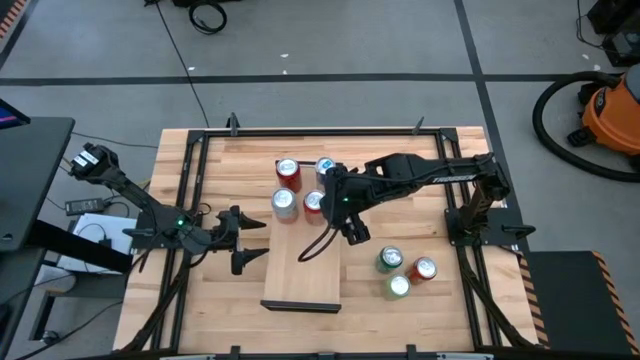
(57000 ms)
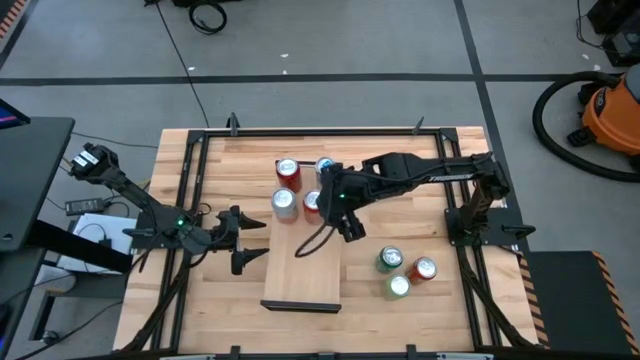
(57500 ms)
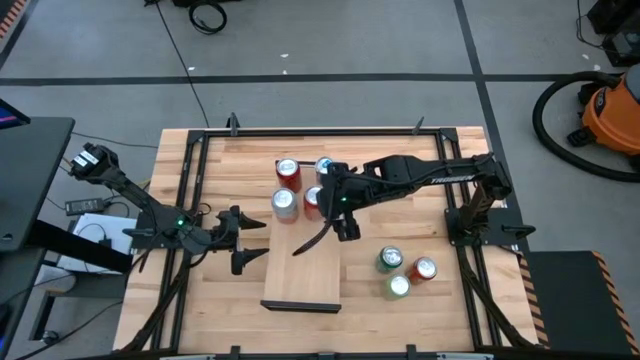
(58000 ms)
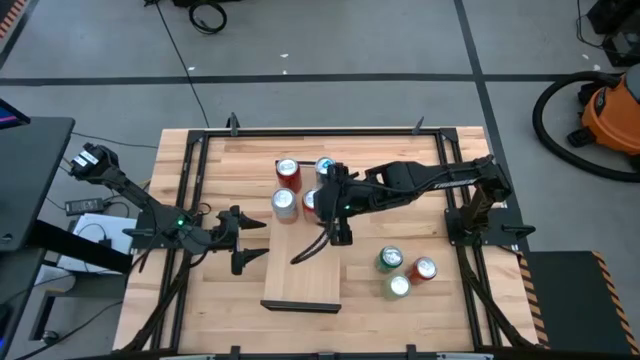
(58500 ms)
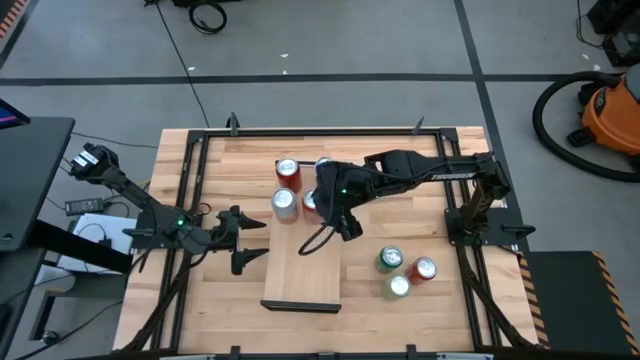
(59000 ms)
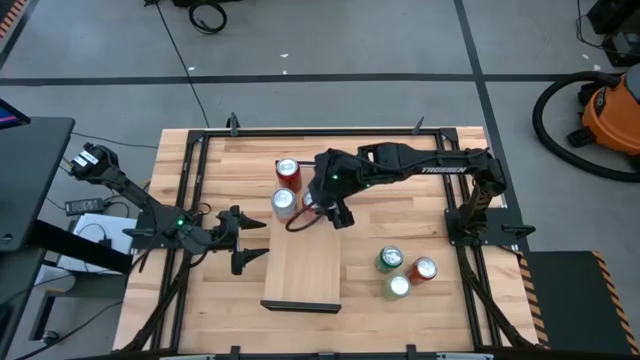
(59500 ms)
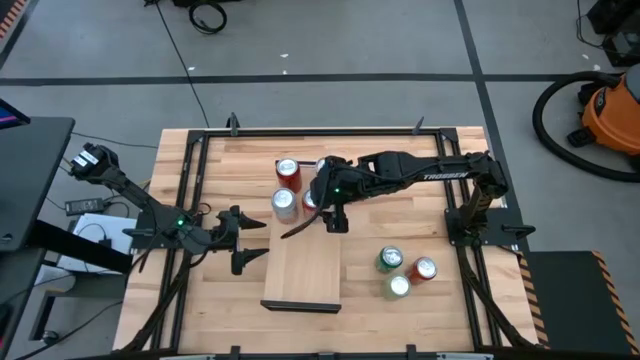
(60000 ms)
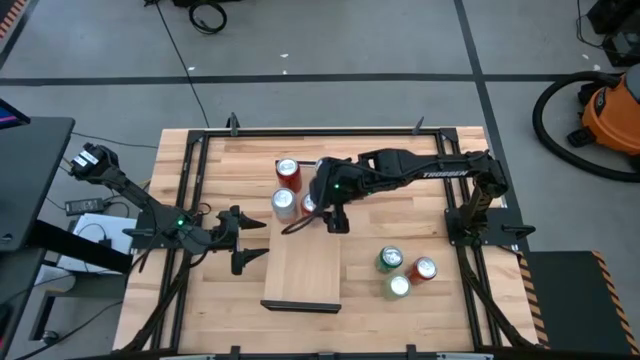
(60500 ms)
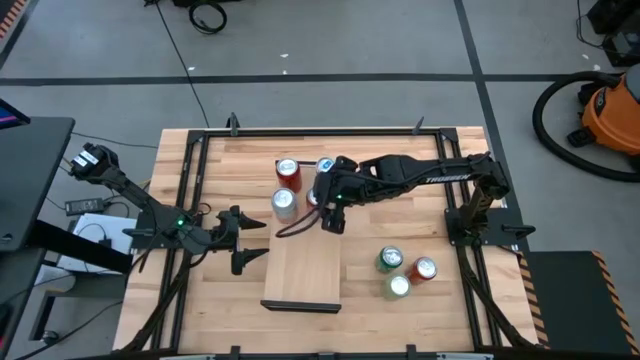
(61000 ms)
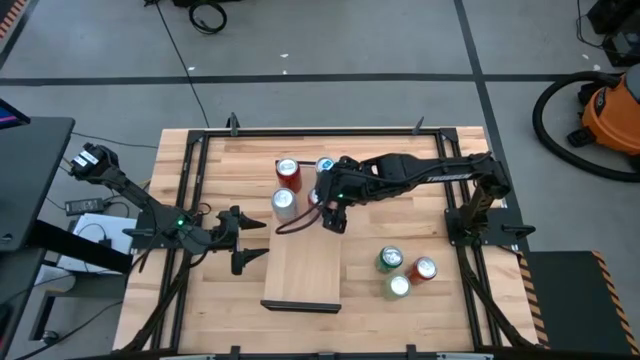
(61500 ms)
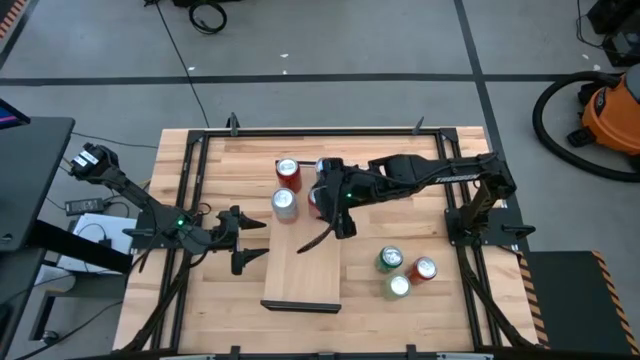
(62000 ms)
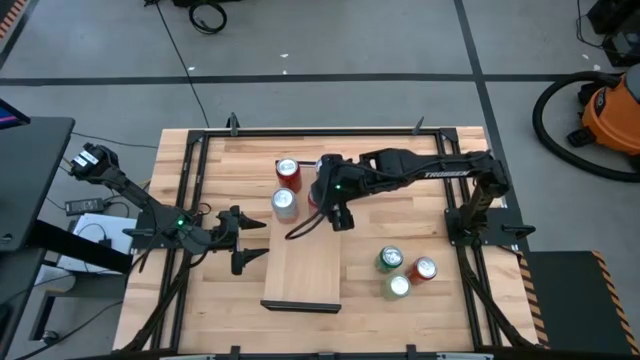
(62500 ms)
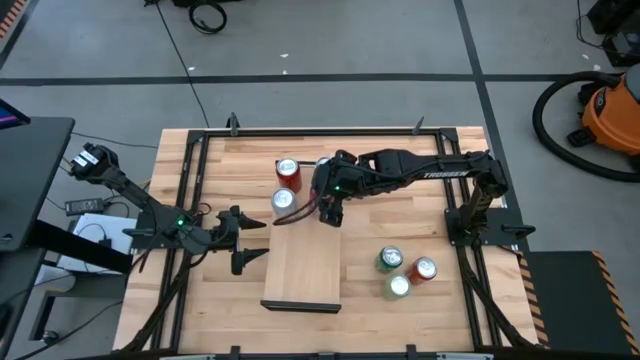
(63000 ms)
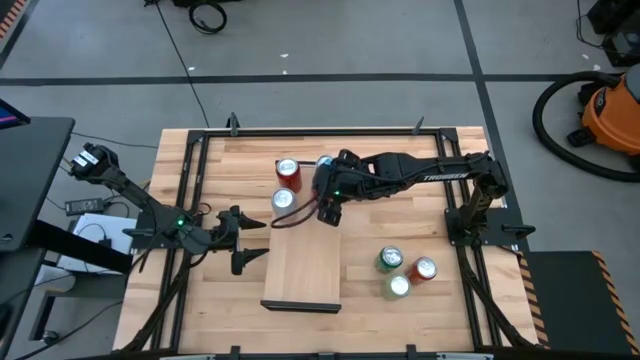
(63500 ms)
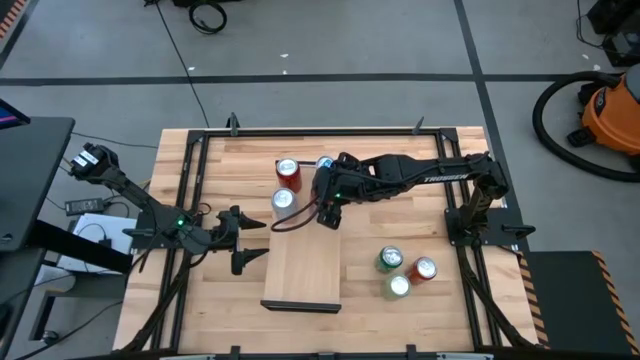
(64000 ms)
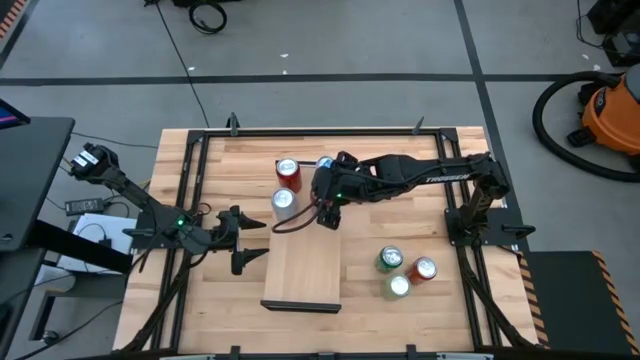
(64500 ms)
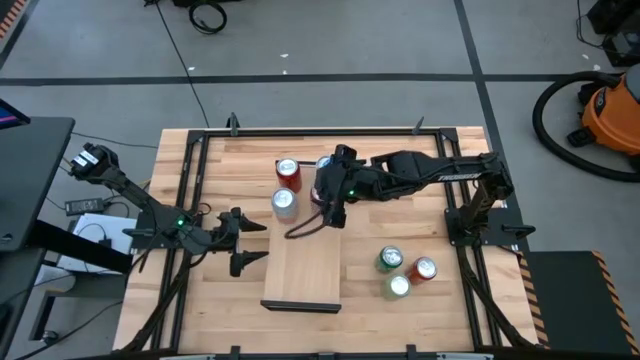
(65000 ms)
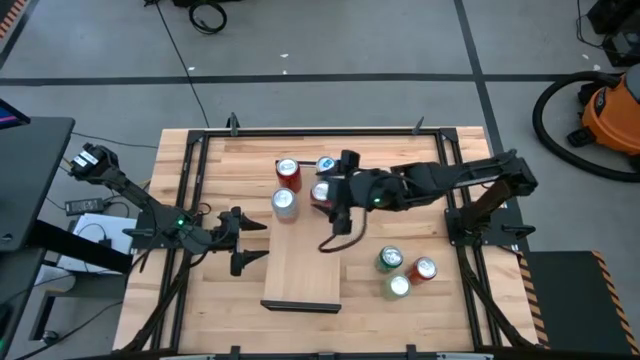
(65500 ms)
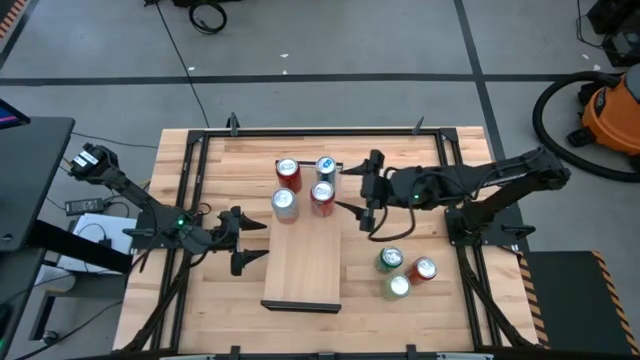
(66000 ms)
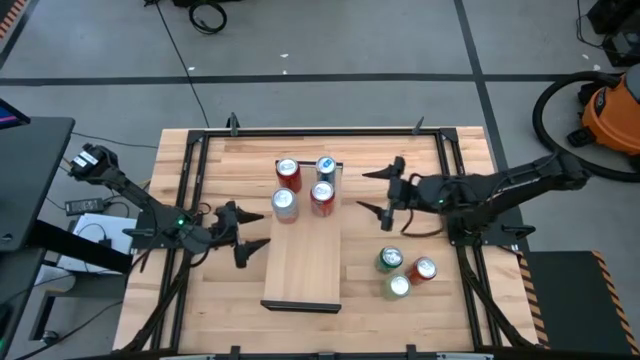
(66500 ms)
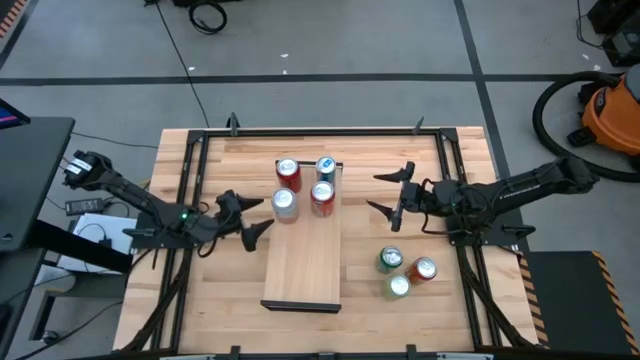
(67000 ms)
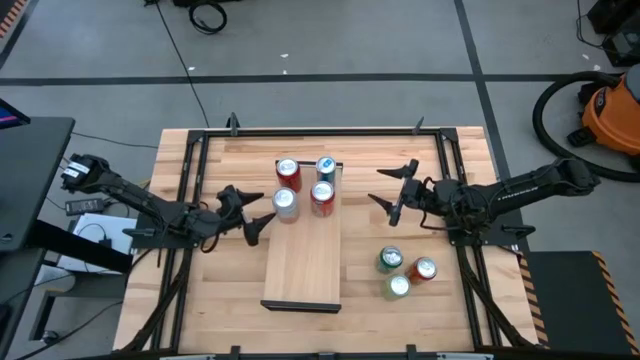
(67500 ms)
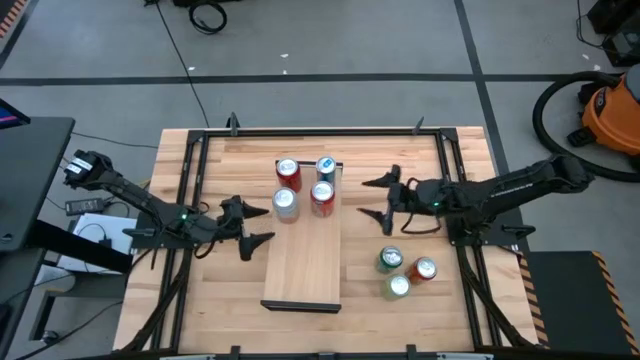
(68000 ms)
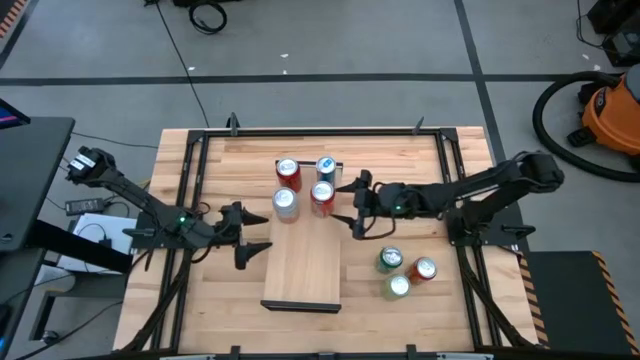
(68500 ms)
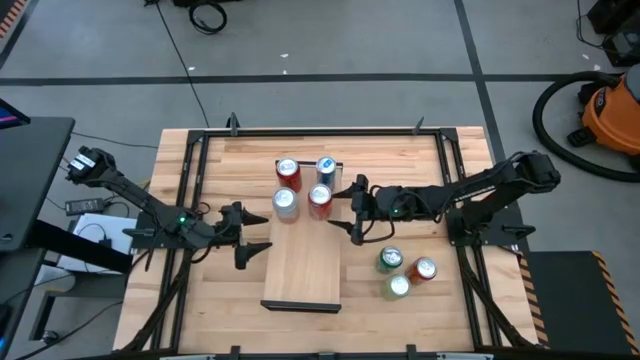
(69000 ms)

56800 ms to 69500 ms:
Task: Place canned beverage on shelf
Put the top orange soda can on the shelf

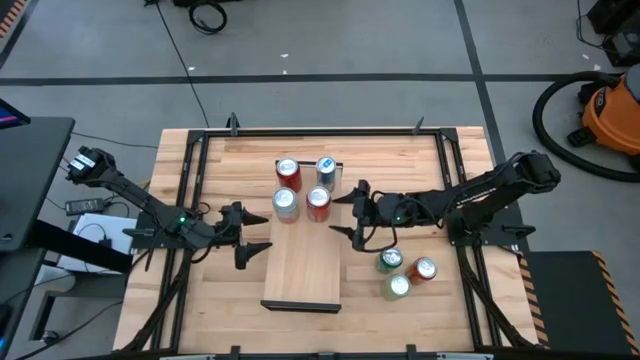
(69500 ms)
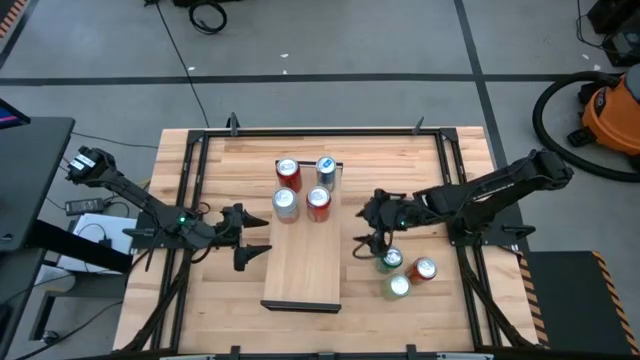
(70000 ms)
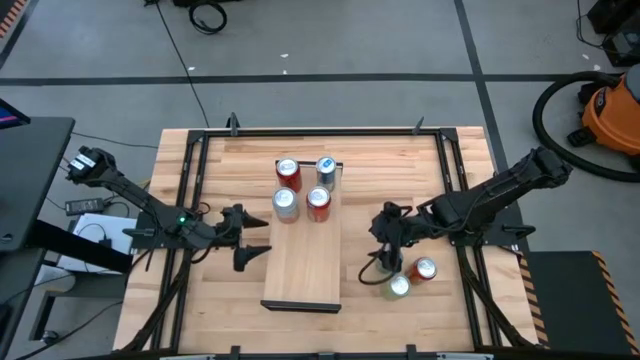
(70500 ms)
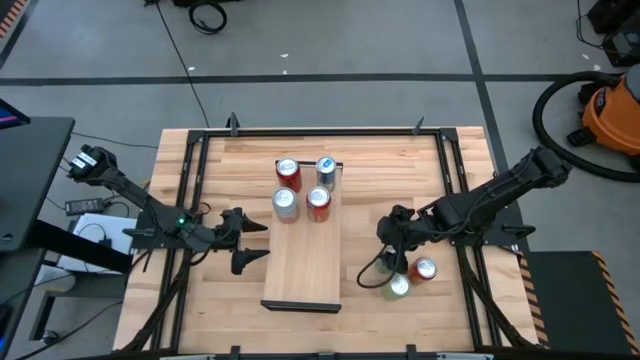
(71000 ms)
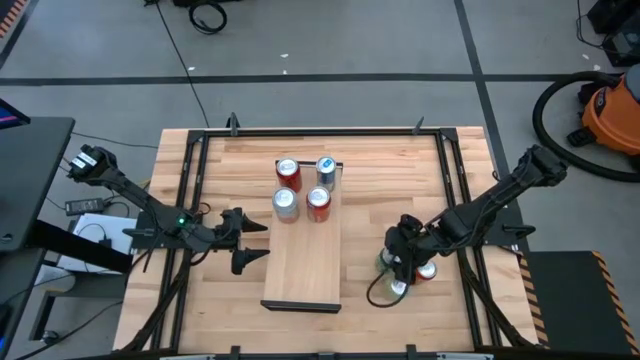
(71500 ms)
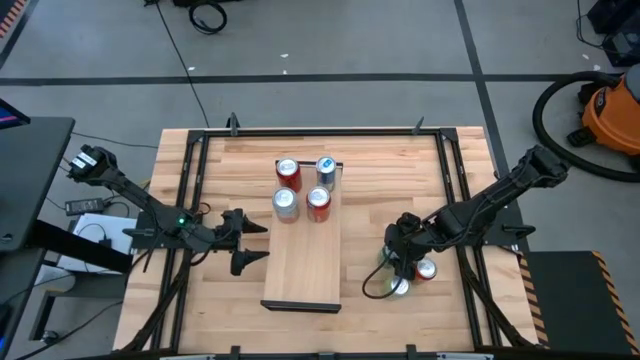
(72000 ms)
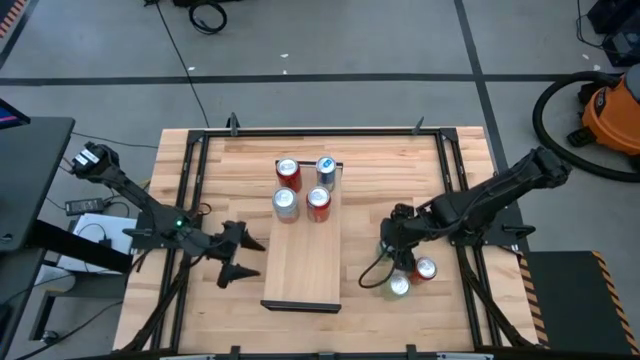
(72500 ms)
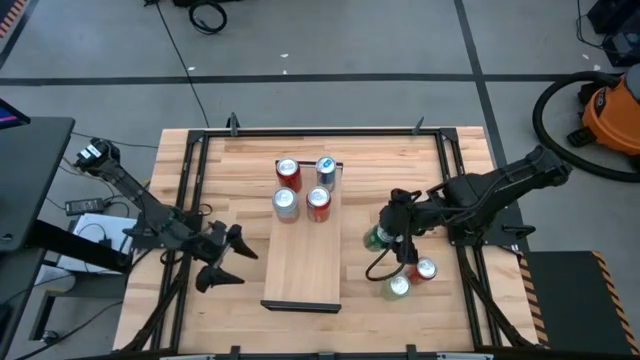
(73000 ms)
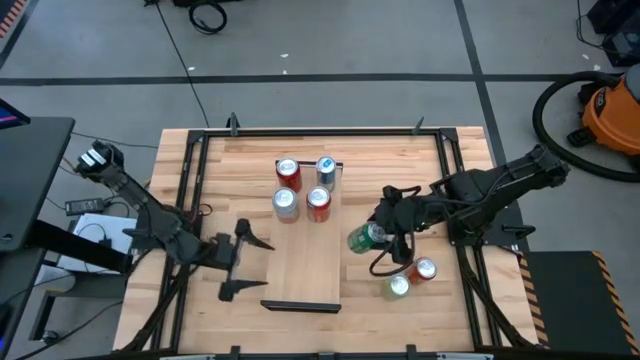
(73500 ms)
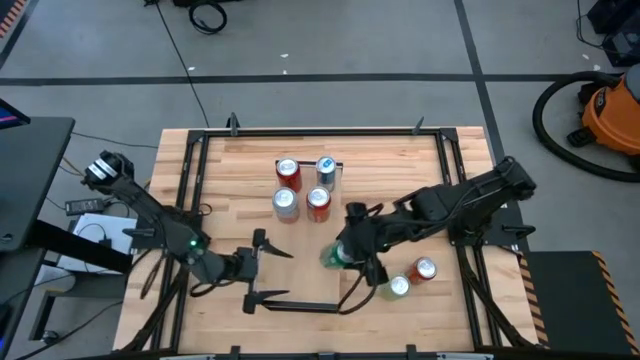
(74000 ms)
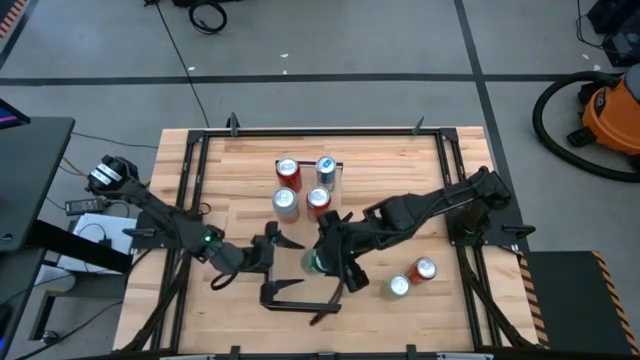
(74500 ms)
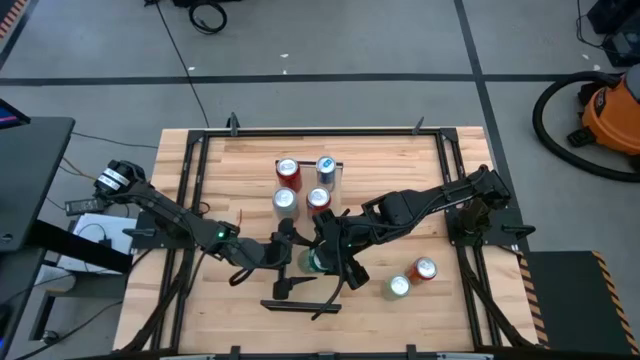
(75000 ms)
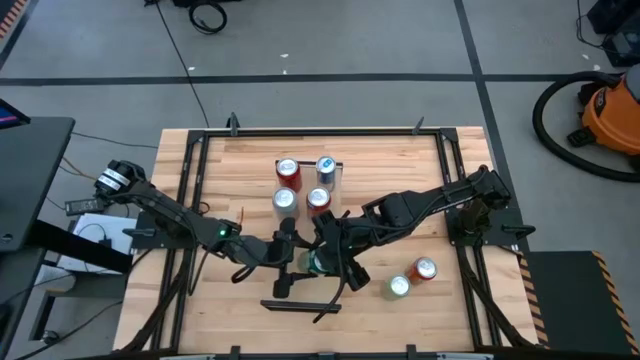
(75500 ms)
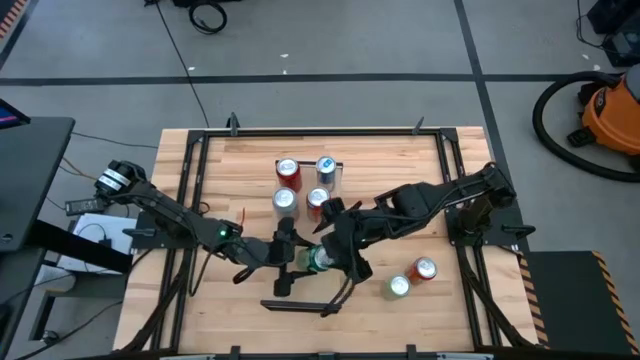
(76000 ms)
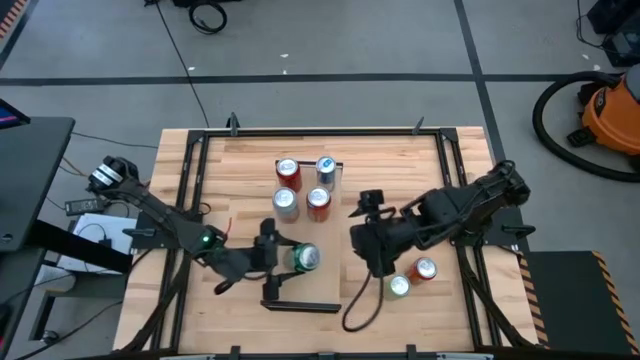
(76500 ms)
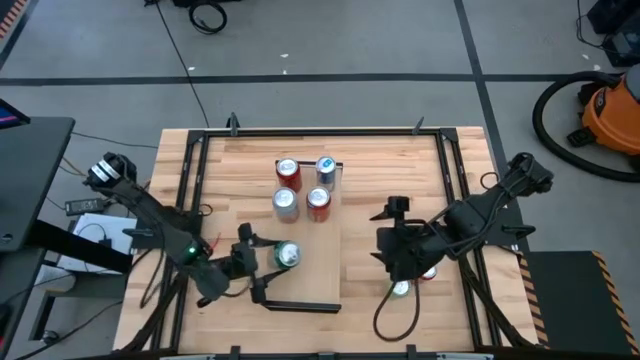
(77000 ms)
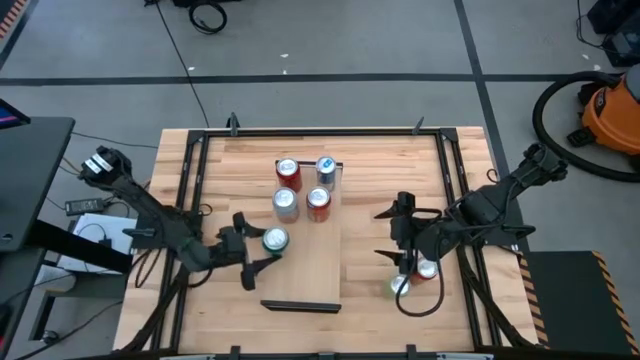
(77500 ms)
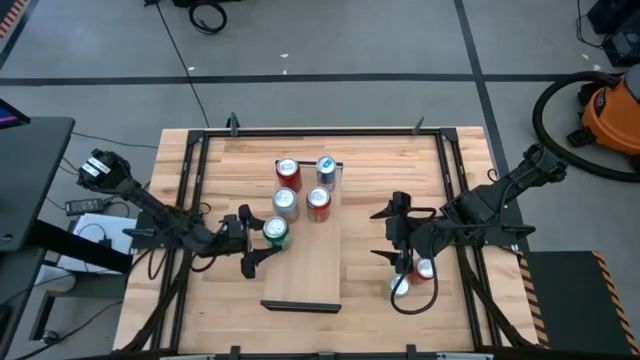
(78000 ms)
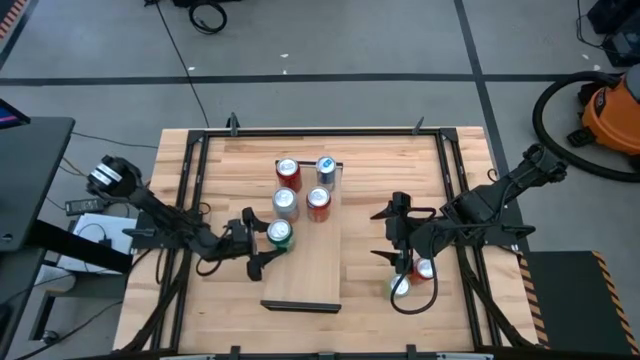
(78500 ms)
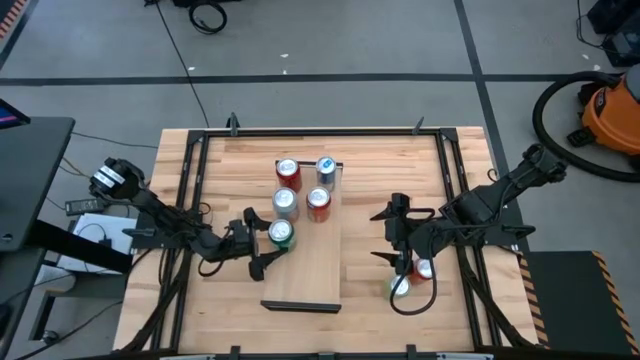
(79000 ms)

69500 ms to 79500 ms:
Put the green soda can on the shelf
